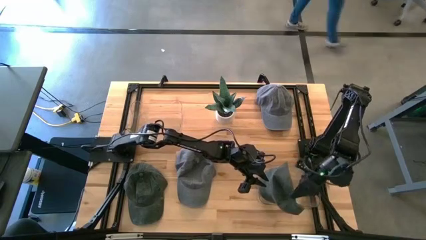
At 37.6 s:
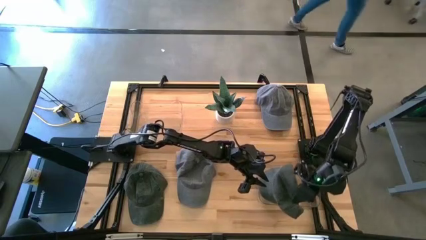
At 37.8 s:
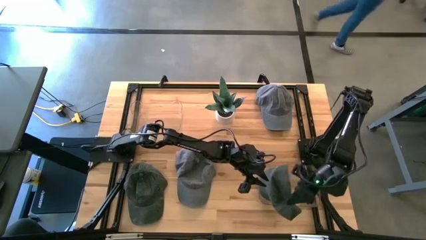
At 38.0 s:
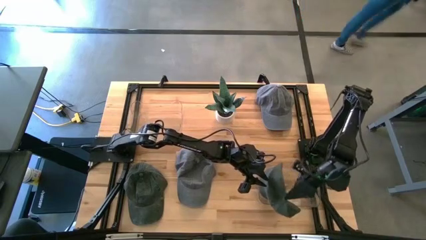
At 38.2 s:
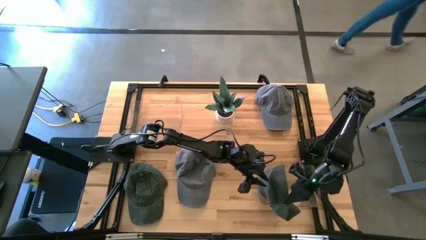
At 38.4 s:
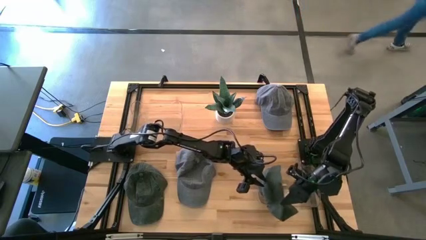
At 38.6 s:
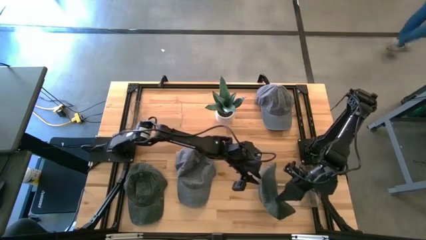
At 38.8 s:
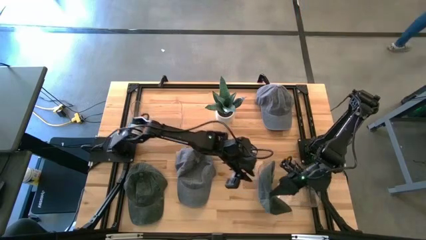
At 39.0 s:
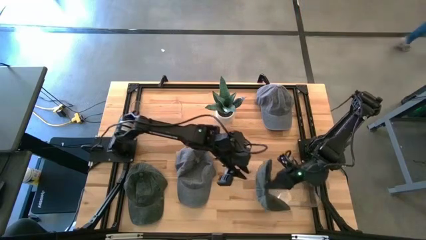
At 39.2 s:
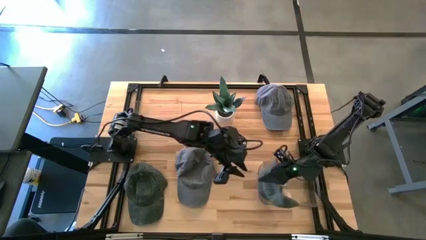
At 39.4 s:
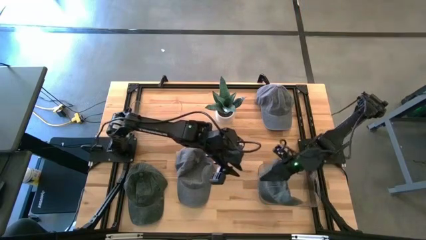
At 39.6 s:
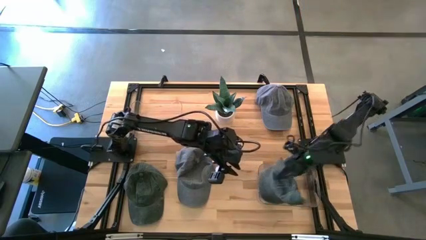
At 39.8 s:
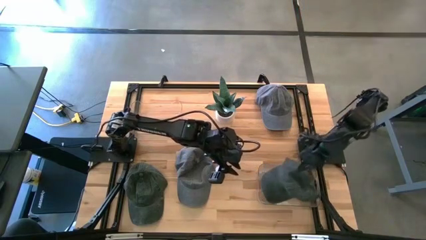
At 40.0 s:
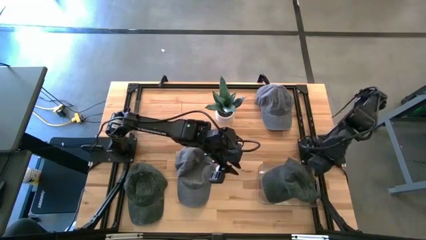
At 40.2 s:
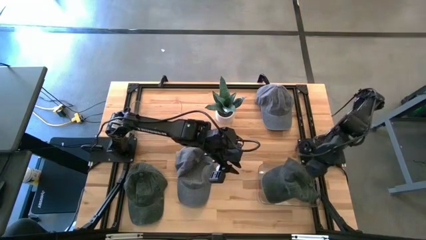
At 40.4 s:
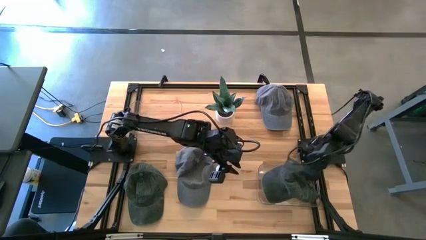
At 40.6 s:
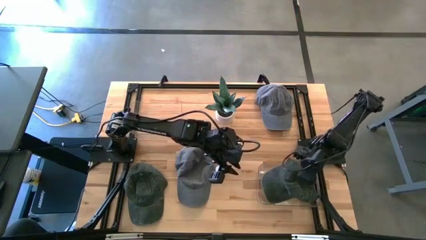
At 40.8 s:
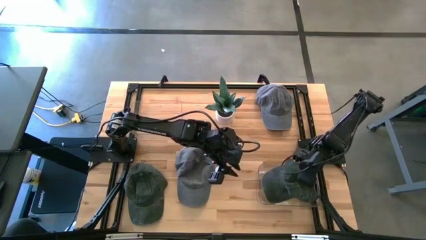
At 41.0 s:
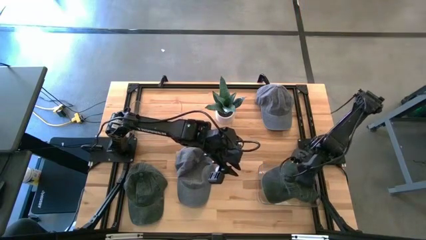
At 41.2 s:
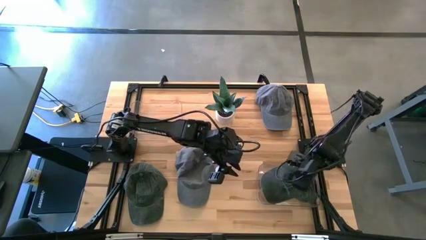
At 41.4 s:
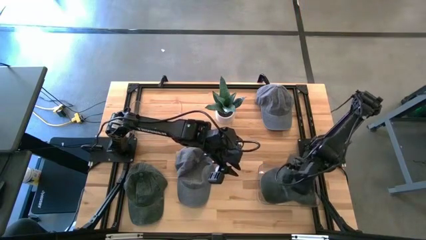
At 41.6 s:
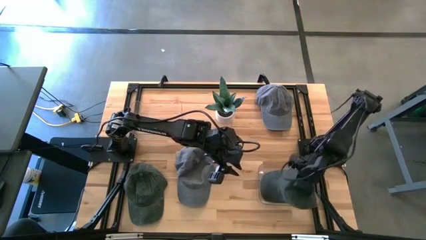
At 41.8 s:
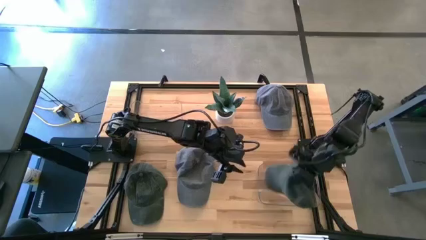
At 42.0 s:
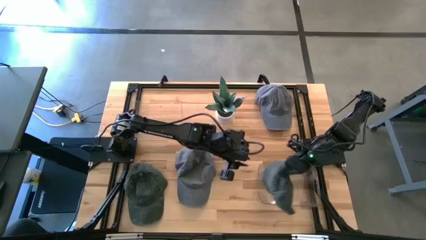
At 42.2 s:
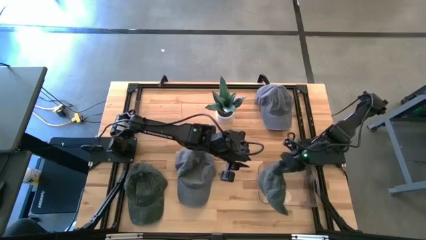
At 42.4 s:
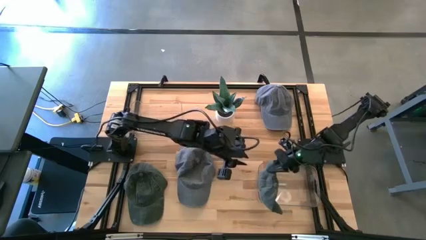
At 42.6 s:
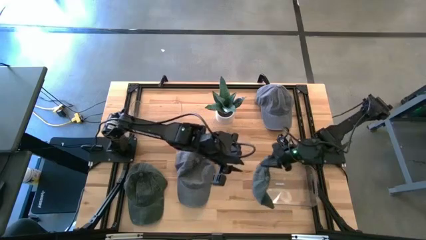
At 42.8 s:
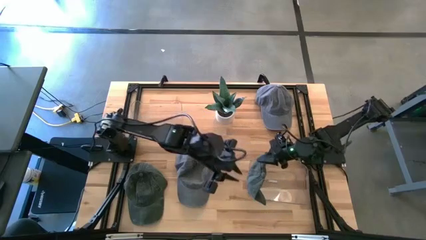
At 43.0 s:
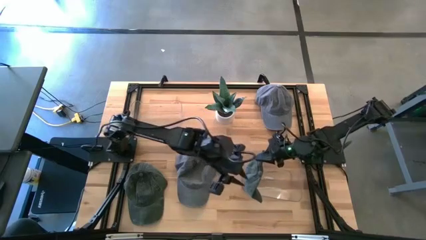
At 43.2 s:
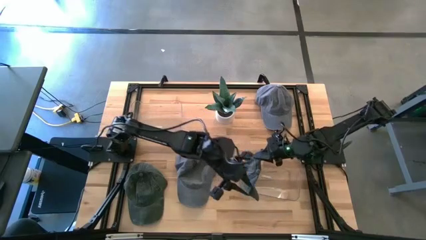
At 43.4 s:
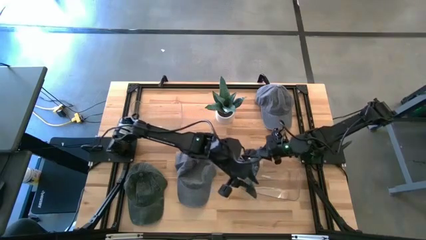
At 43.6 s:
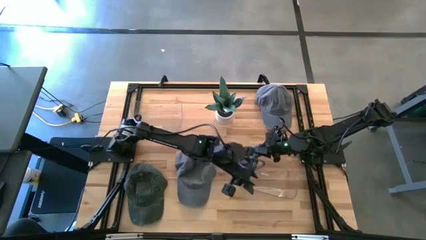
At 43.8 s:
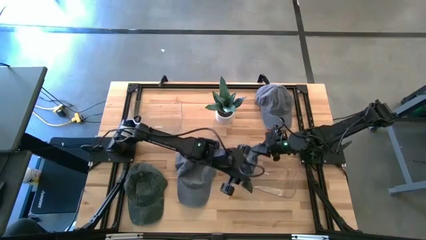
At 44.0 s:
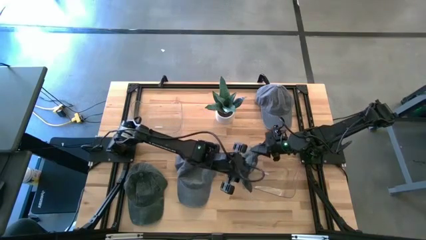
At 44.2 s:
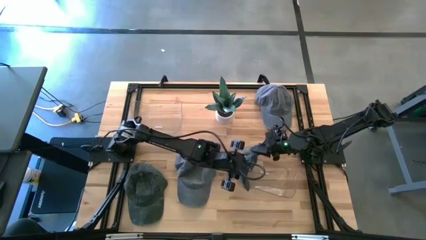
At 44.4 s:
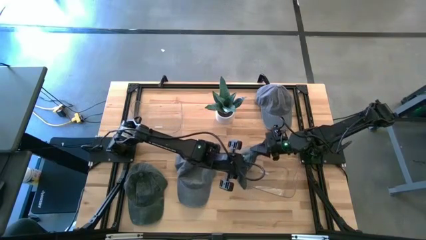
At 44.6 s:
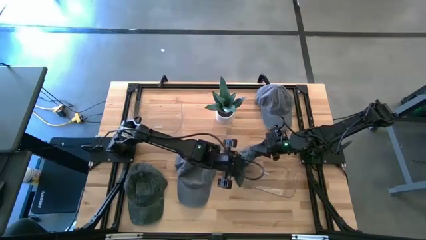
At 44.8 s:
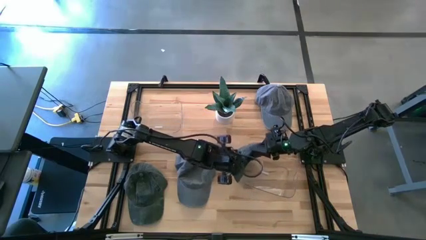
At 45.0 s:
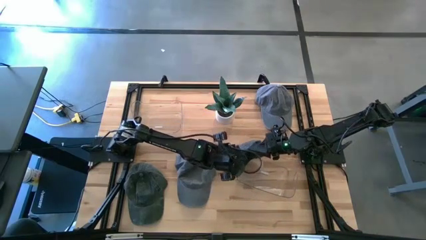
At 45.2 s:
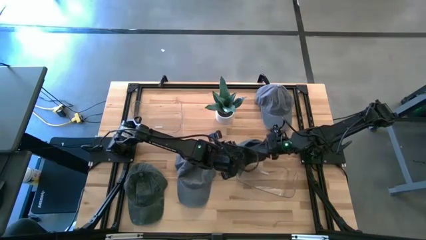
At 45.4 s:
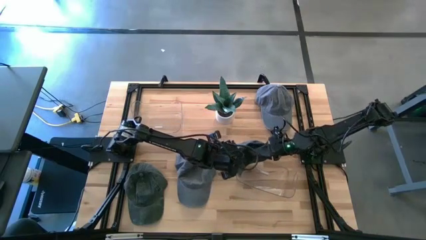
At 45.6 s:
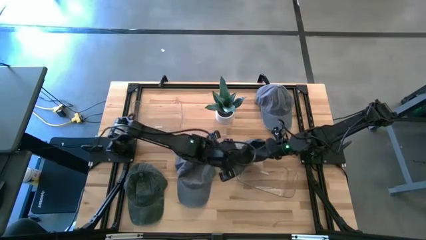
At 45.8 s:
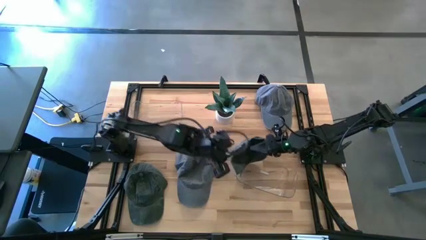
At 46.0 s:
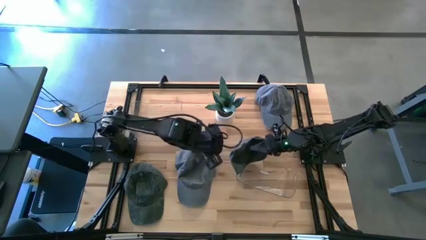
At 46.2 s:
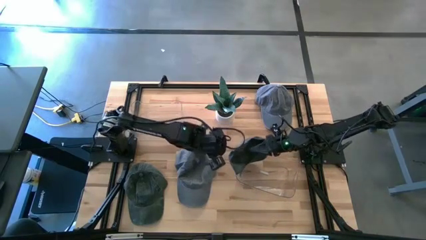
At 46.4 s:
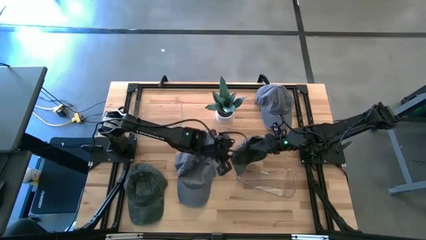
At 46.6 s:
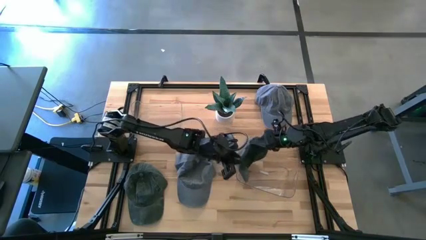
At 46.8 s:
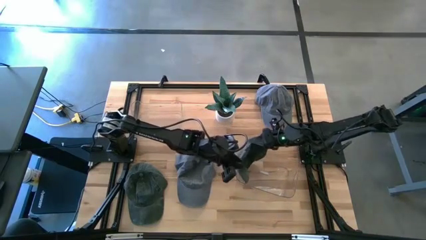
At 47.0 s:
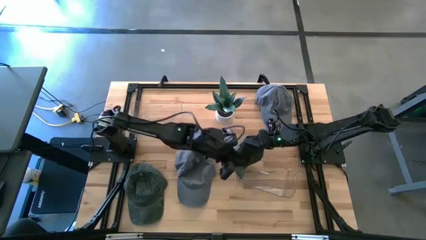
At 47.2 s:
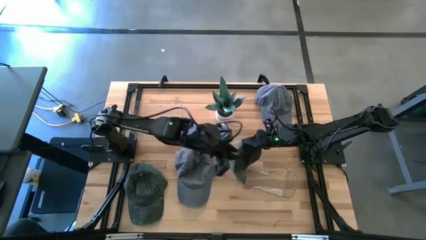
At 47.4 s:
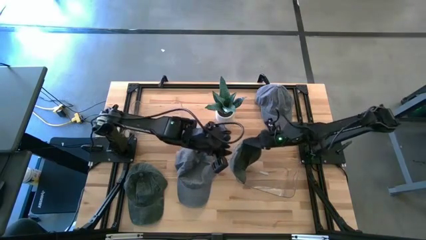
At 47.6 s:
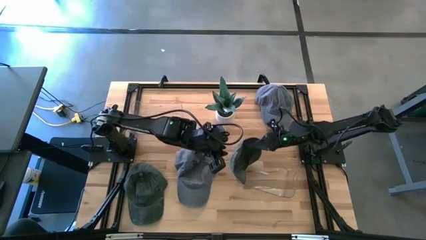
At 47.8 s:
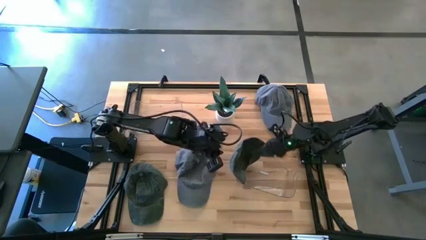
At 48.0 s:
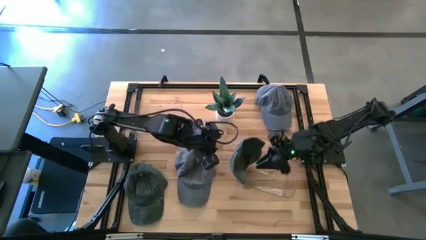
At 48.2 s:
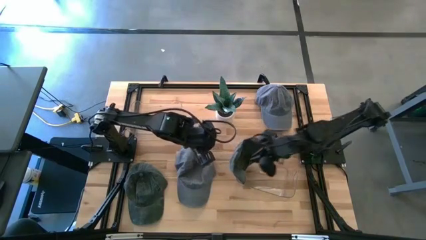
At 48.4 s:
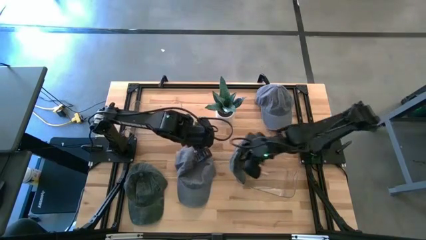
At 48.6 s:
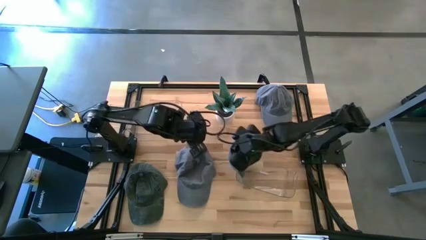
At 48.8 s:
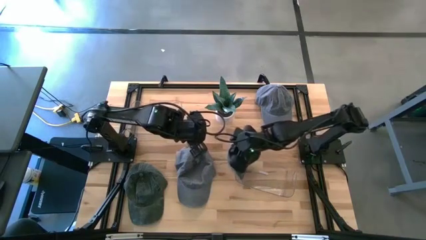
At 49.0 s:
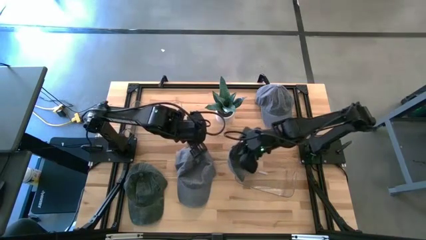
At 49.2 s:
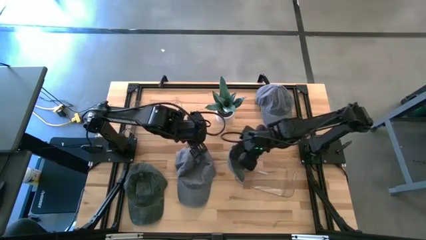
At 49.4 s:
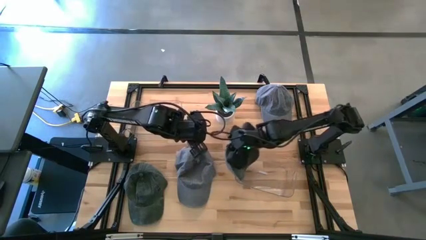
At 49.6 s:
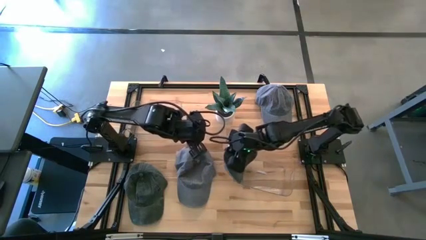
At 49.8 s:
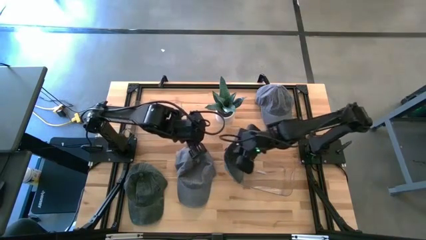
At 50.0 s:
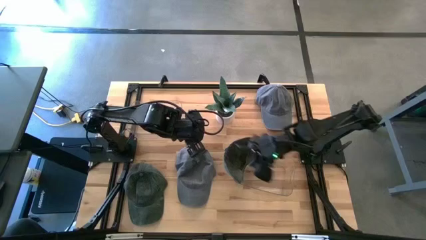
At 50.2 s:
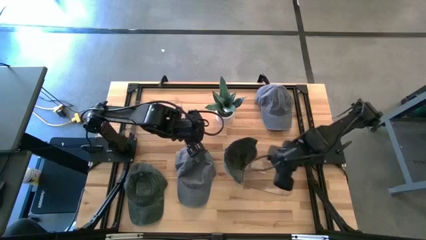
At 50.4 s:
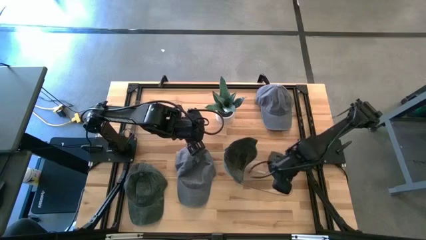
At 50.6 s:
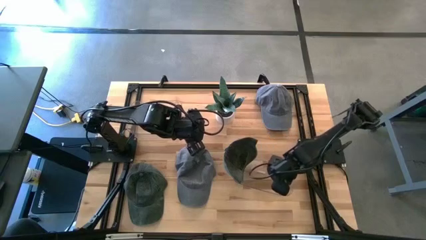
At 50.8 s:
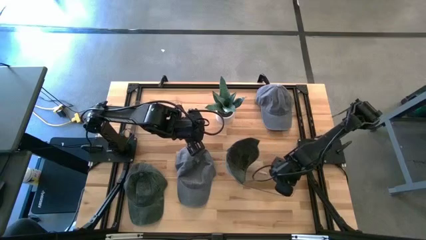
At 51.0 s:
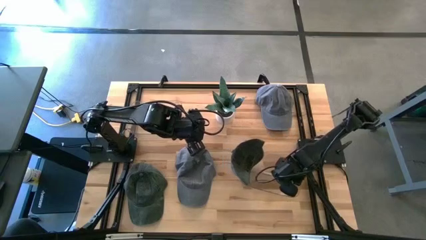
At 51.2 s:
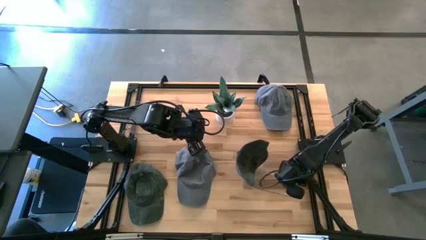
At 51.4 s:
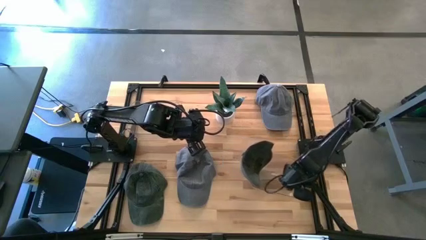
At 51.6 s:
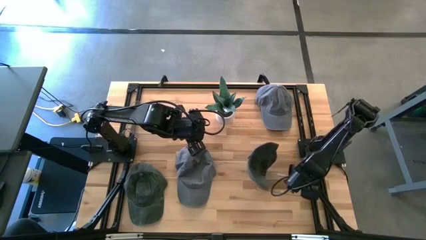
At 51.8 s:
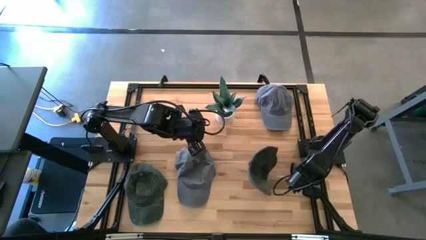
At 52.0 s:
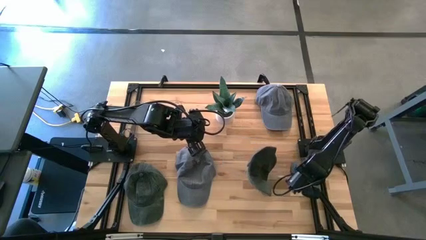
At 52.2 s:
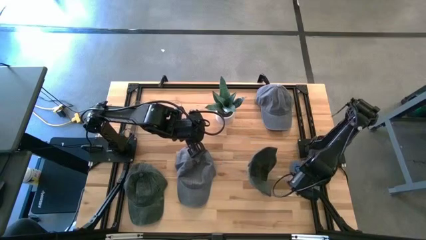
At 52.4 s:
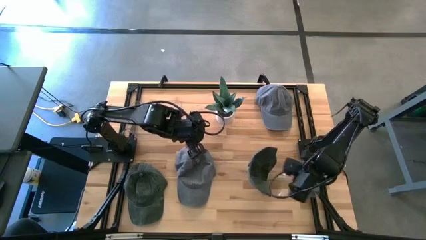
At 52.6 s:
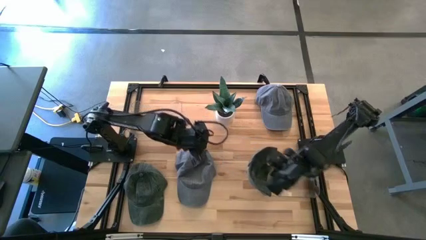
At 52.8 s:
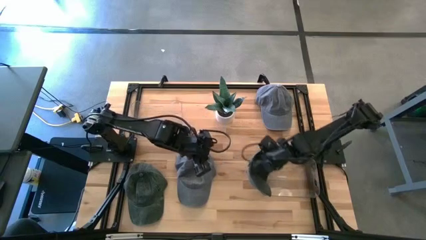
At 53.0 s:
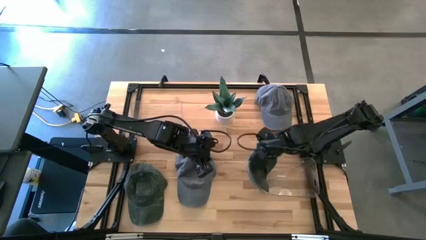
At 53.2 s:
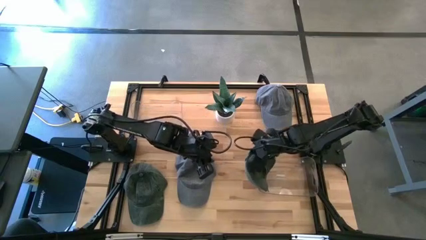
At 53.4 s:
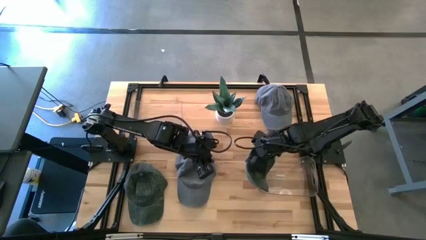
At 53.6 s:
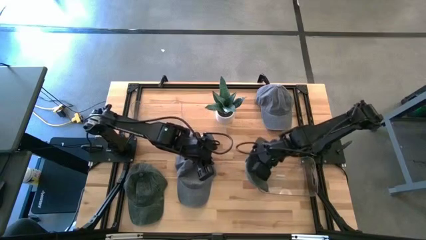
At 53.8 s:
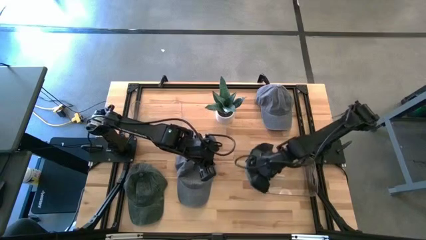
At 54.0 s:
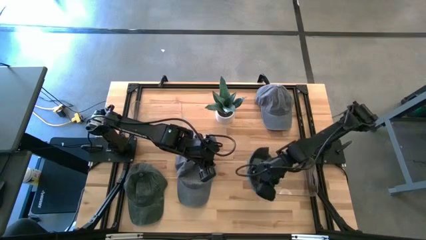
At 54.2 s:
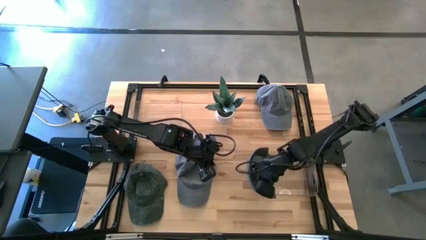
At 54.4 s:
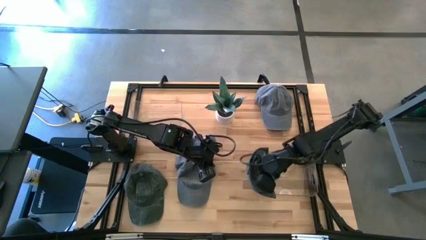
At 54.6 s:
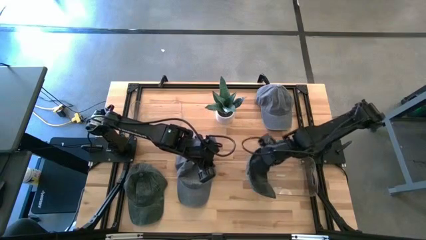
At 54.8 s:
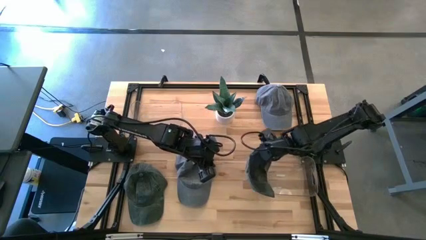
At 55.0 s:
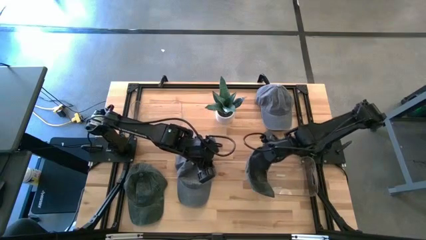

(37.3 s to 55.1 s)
Task: Pick & Place hat
Put the right black cap into the right transparent bin
